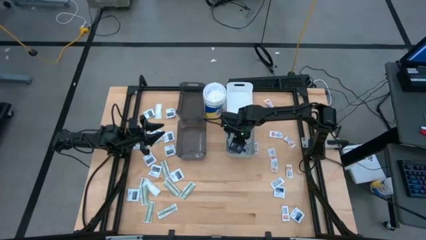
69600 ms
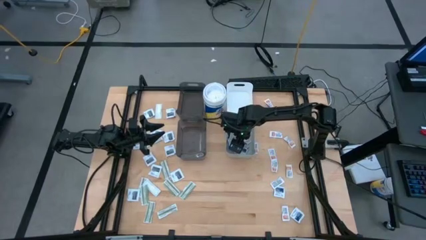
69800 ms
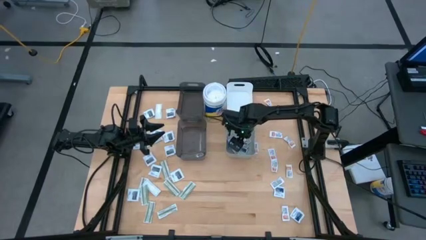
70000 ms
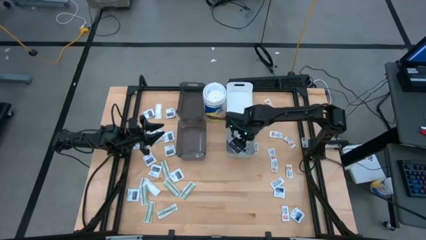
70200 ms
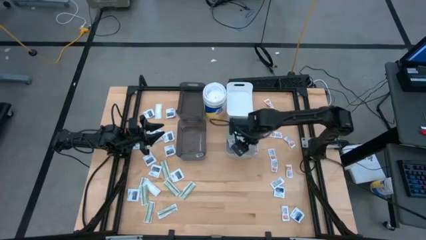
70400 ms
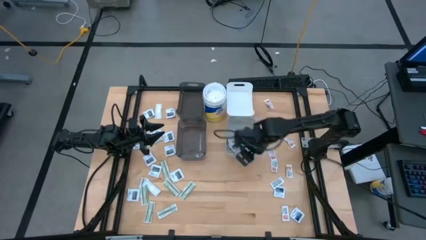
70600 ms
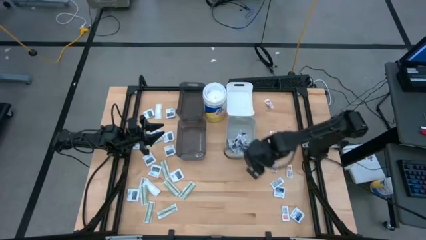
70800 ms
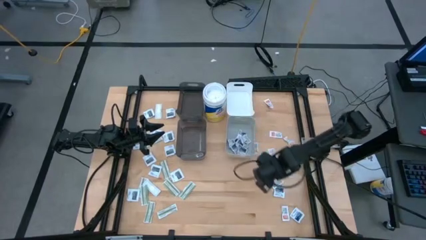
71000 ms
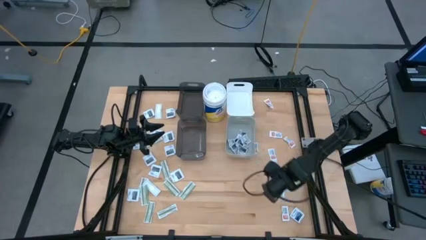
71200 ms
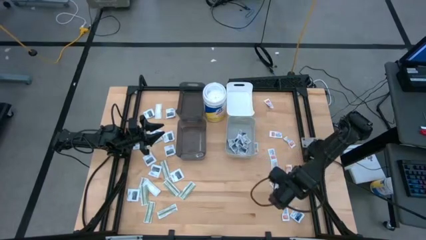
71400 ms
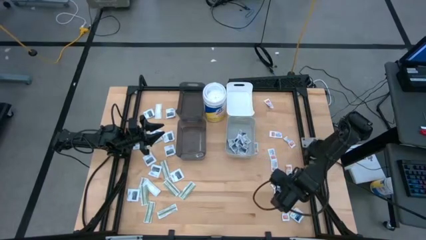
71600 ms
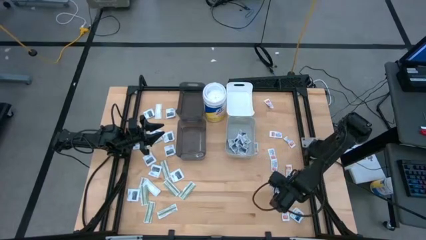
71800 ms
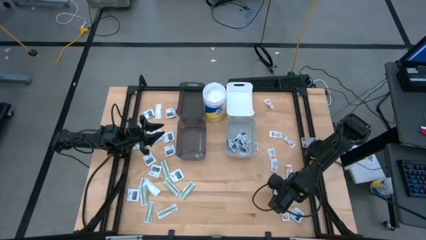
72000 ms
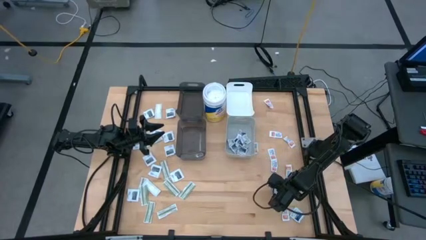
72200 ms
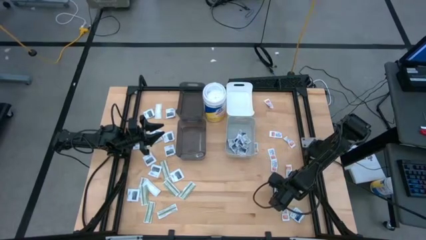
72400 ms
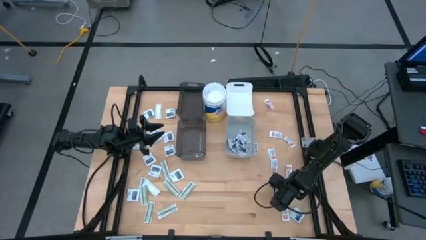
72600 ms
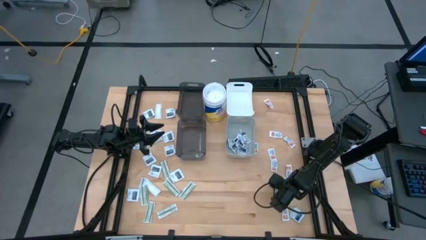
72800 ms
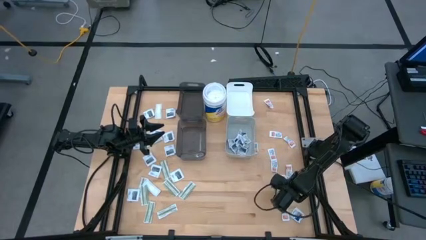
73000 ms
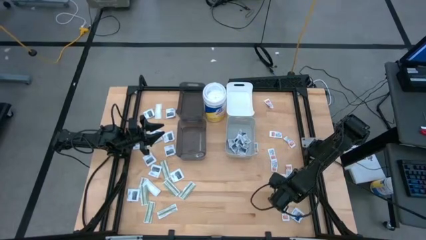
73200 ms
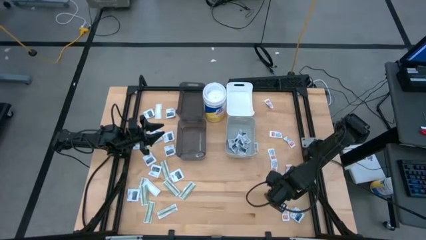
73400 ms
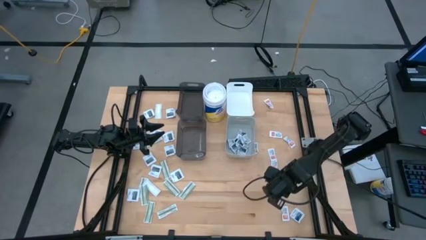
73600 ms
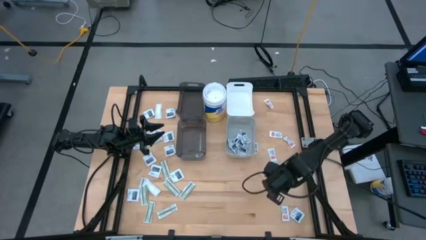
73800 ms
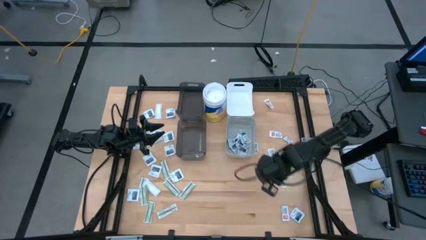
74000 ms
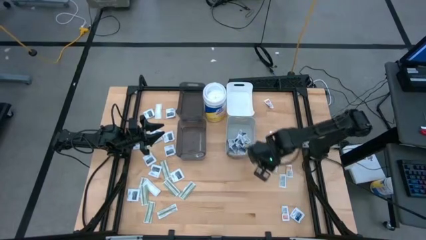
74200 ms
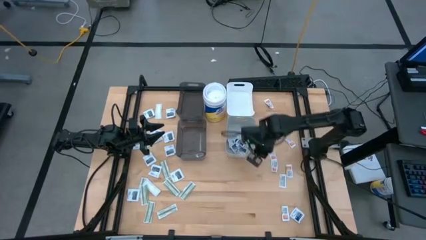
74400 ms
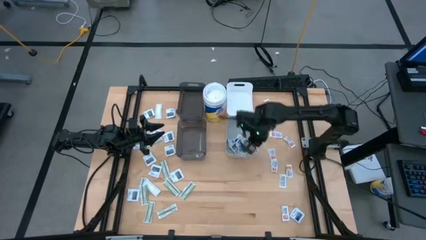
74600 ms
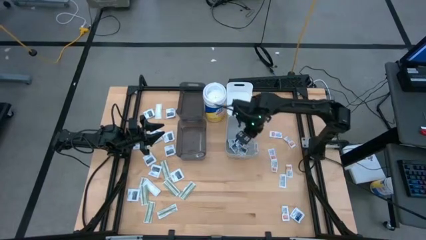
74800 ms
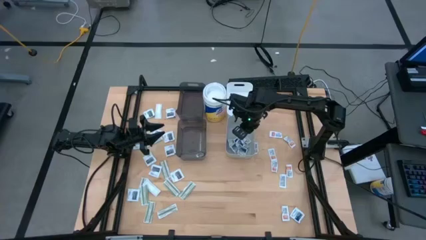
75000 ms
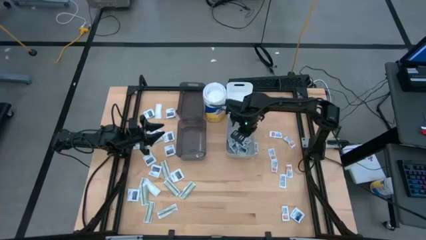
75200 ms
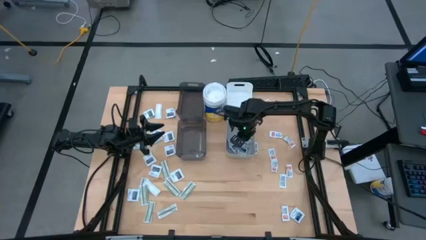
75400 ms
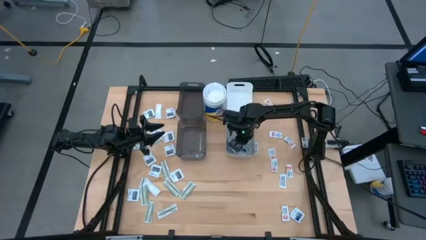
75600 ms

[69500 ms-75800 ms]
Task: Pick & Place First Aid Supplies
Put the top alcohol pad into the gray bin

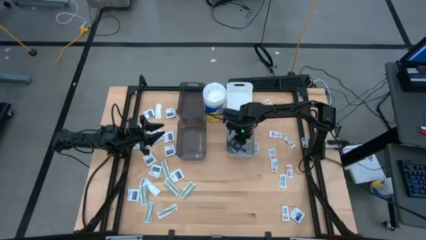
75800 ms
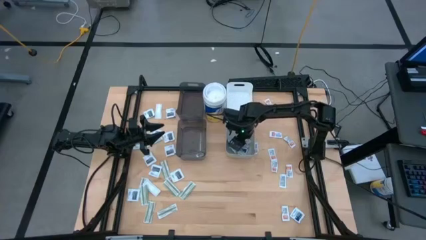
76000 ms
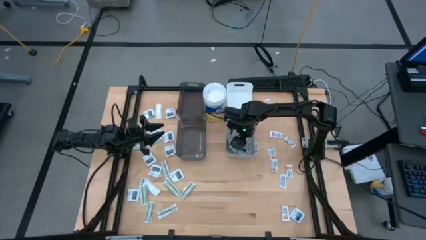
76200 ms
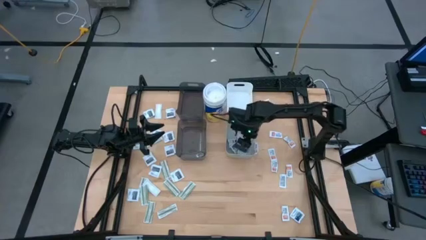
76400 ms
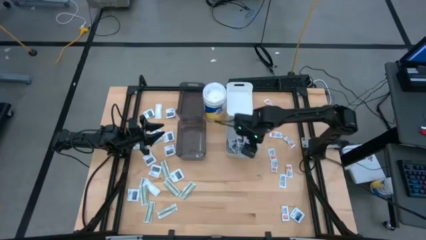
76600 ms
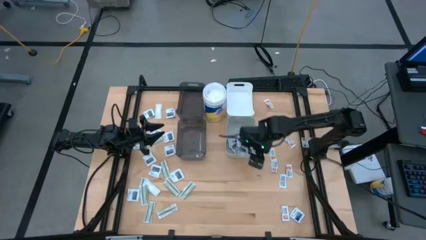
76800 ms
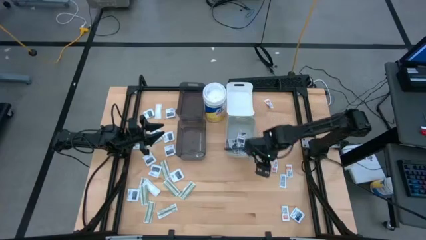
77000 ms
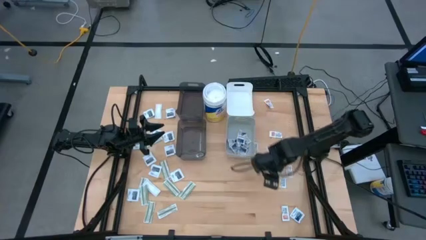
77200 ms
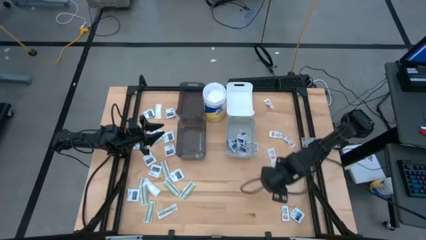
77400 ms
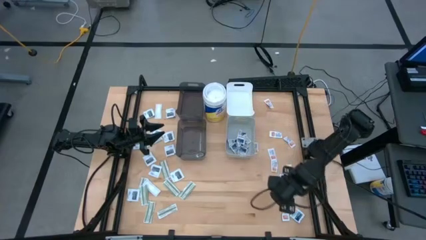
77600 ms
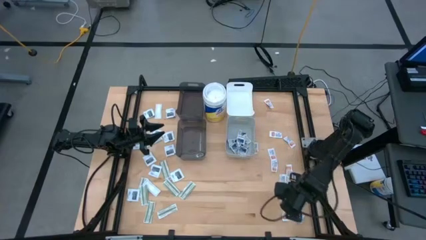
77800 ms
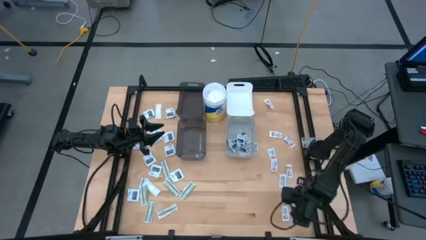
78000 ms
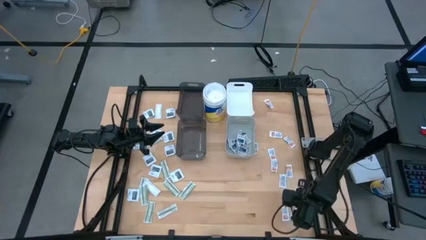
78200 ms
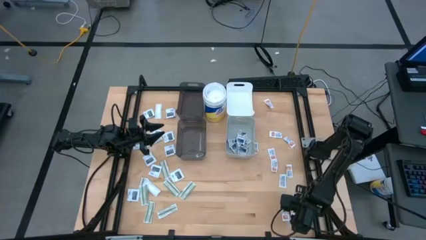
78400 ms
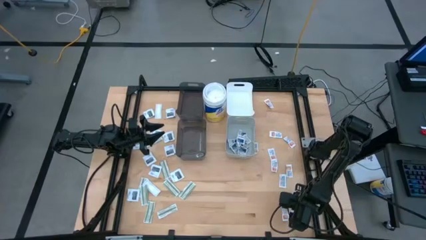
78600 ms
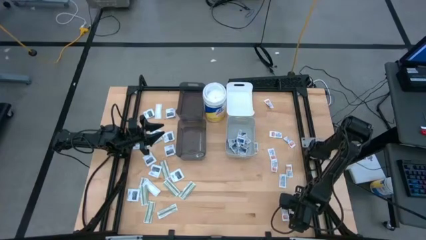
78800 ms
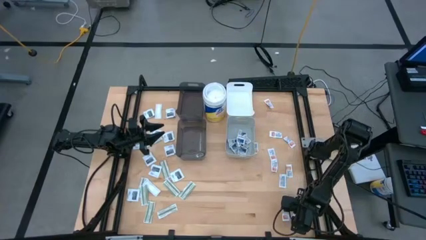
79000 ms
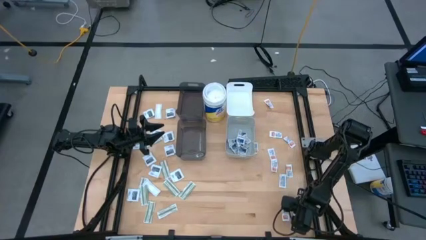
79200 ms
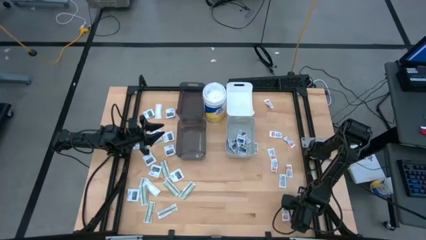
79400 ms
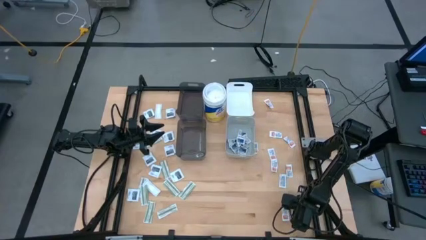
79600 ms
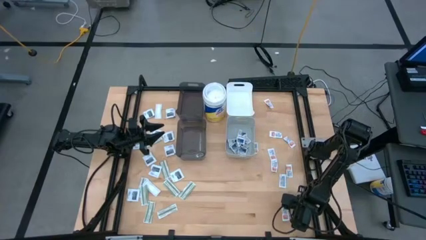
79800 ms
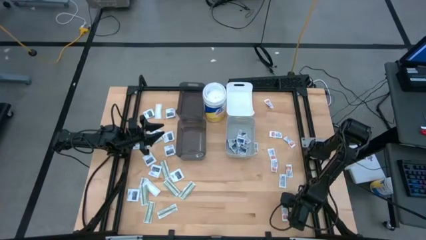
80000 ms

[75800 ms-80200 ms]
Put the alcohol pad into the gray bin

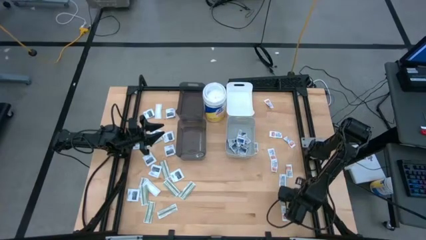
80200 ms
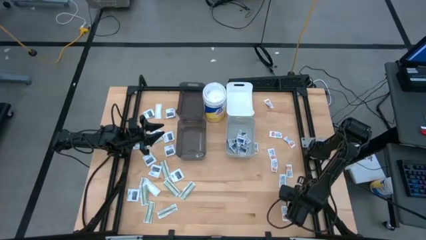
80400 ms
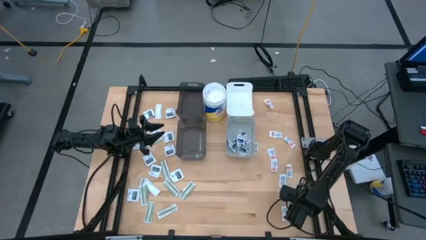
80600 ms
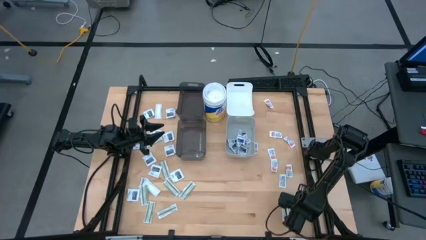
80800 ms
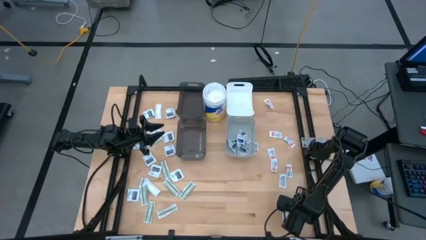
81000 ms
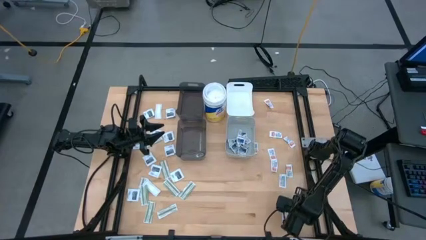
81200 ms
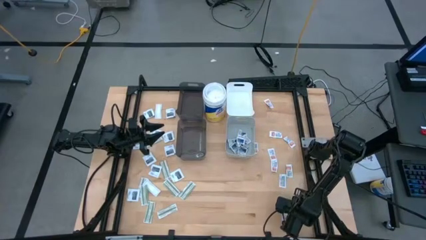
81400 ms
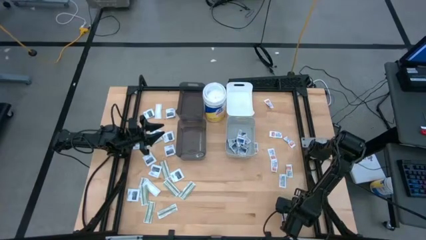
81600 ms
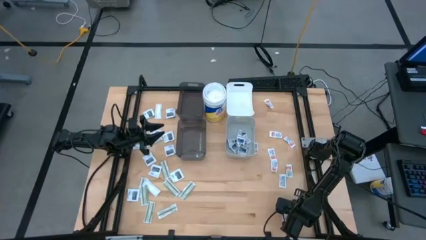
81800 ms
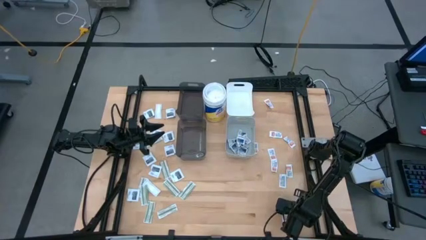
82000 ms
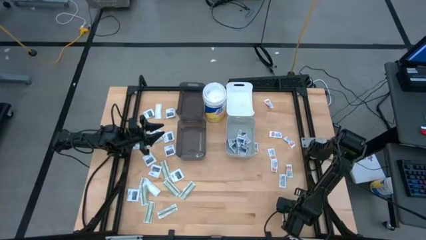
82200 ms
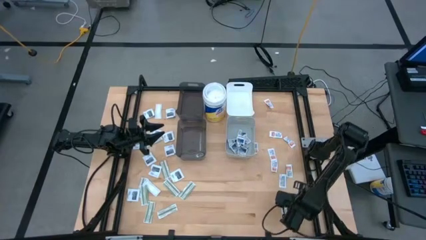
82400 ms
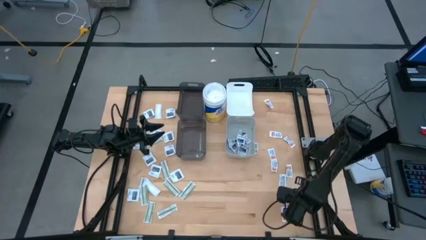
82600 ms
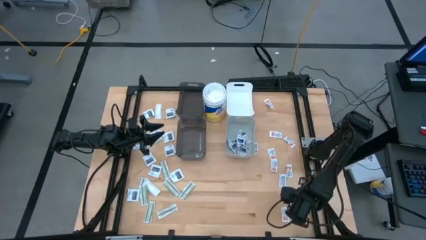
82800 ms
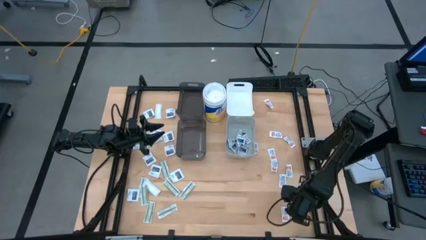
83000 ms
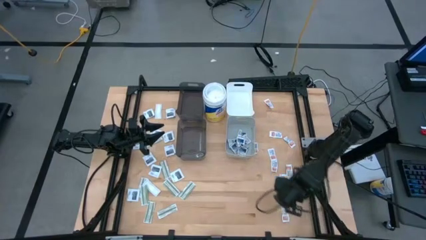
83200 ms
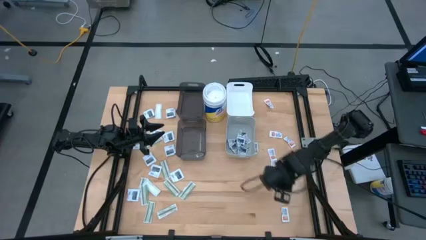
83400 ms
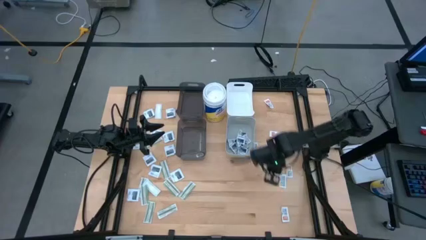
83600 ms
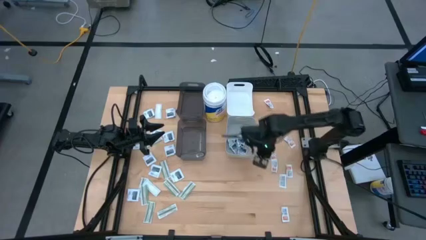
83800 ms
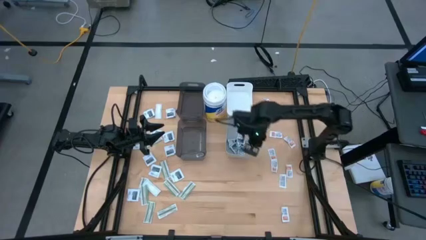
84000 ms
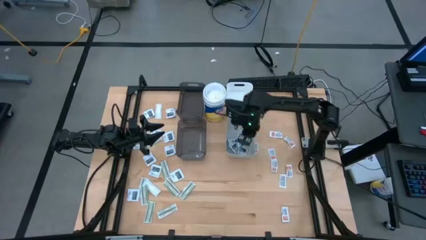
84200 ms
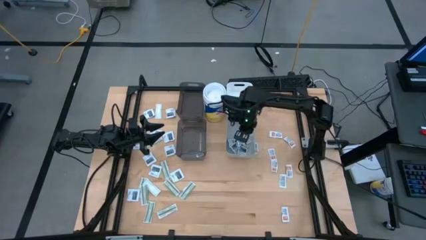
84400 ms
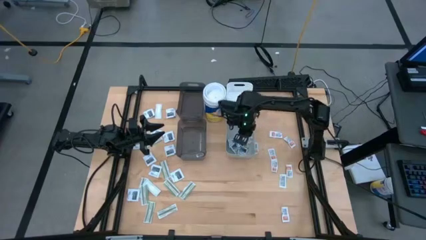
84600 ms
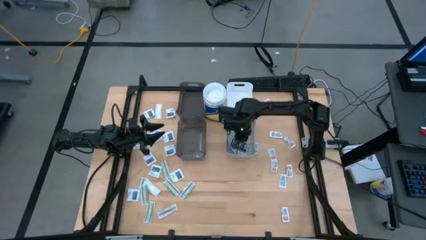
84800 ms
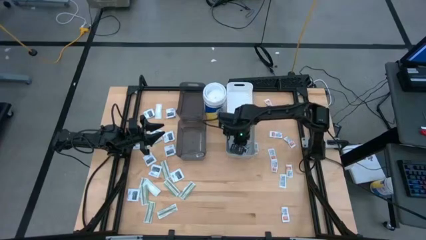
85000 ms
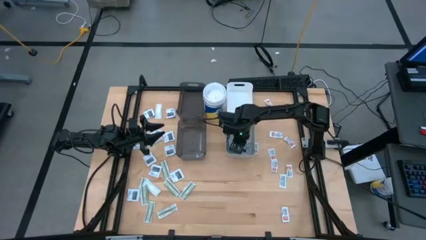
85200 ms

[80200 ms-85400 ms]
Put the alcohol pad into the gray bin
